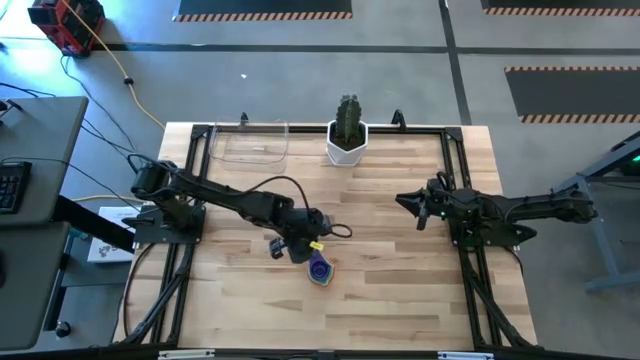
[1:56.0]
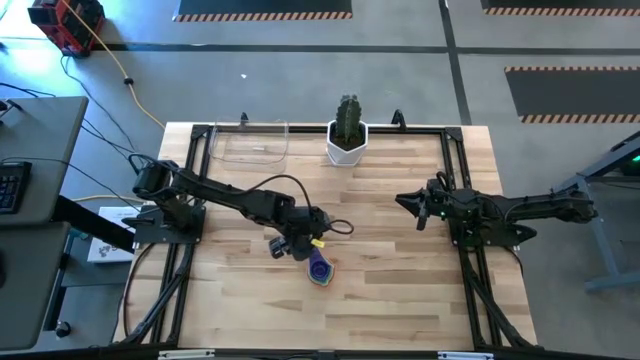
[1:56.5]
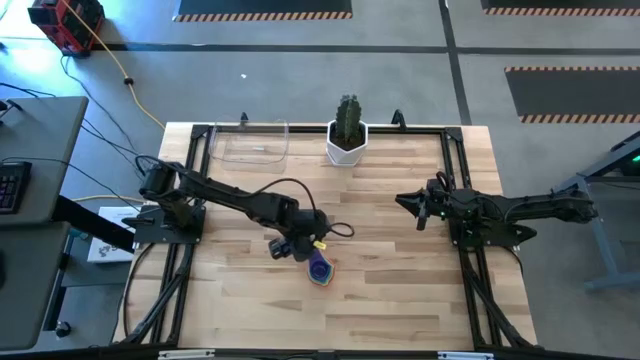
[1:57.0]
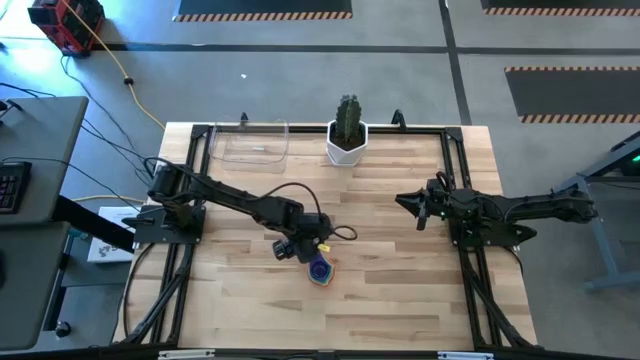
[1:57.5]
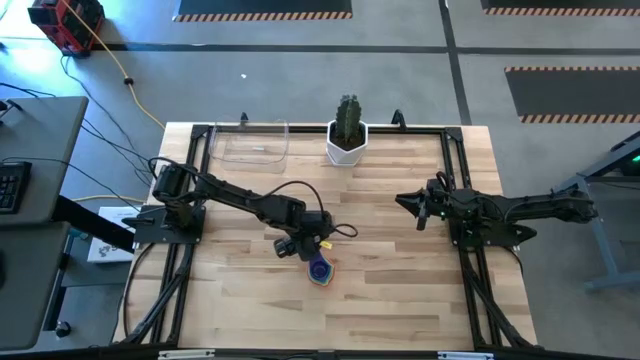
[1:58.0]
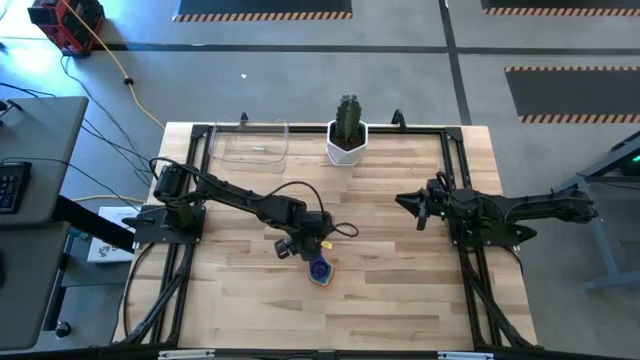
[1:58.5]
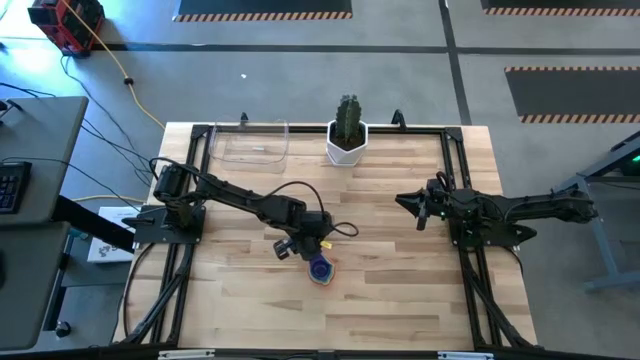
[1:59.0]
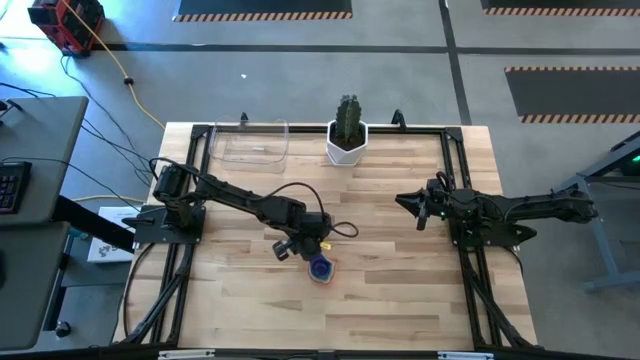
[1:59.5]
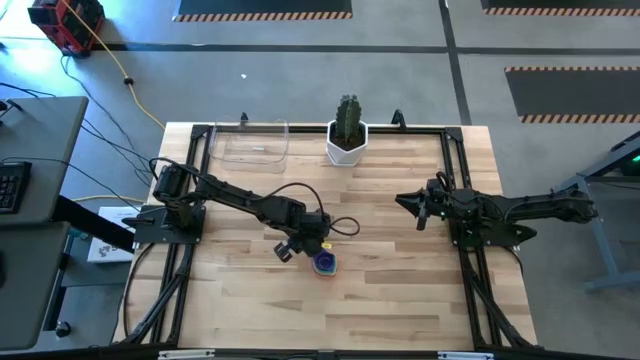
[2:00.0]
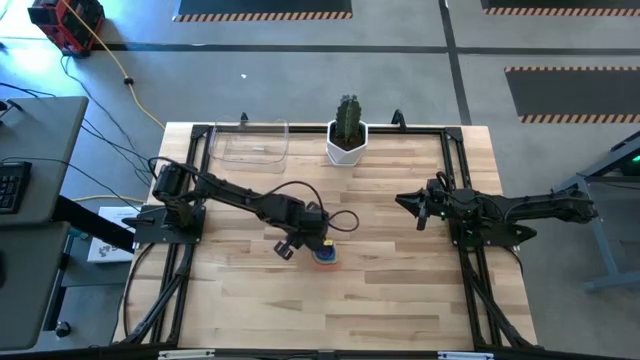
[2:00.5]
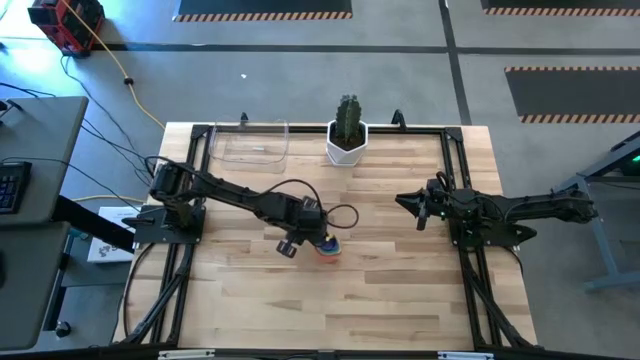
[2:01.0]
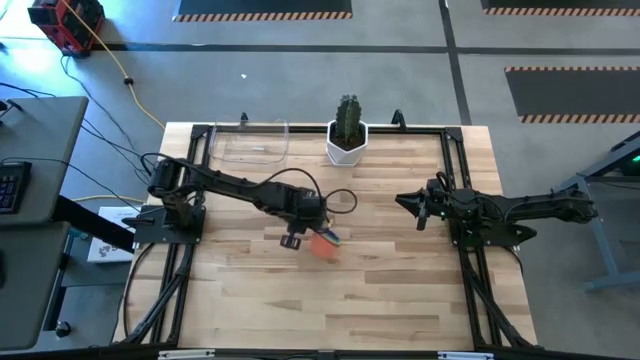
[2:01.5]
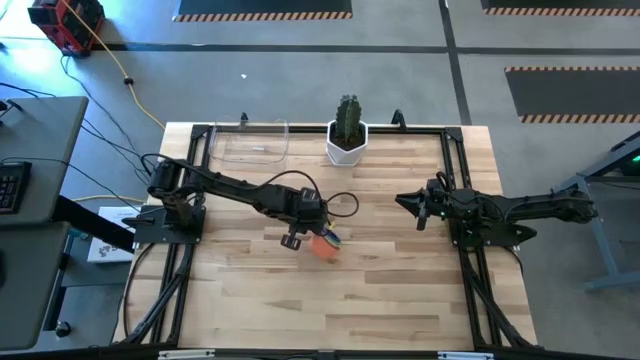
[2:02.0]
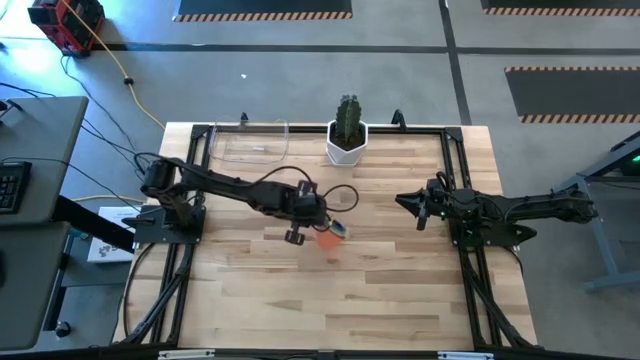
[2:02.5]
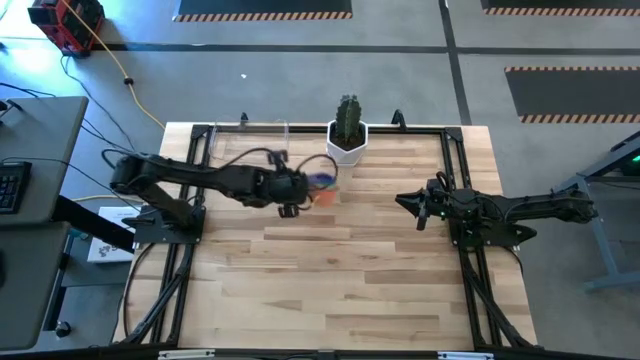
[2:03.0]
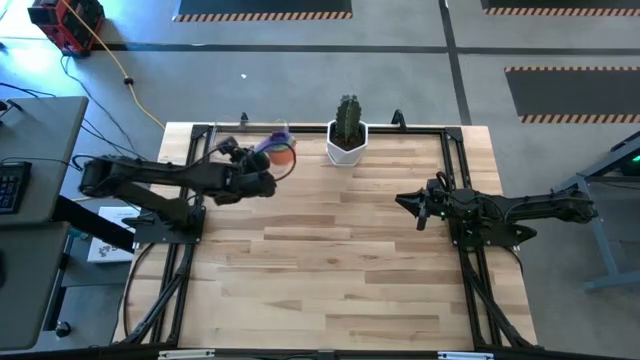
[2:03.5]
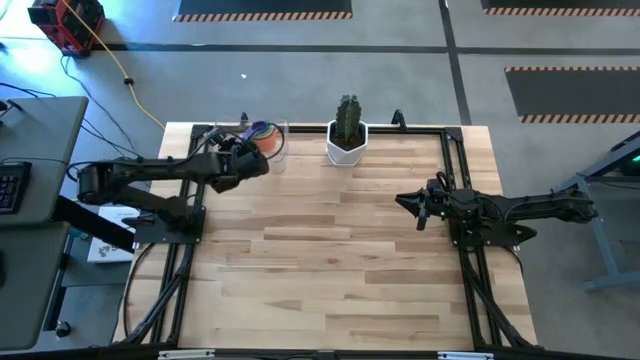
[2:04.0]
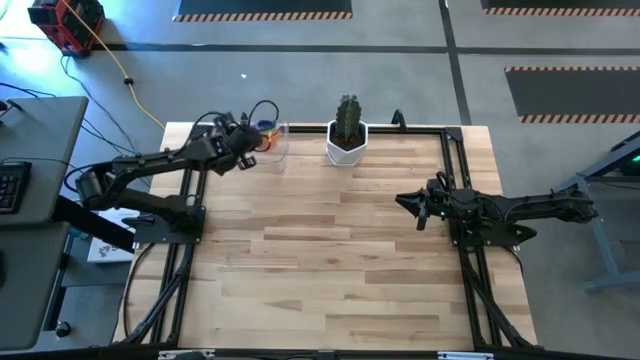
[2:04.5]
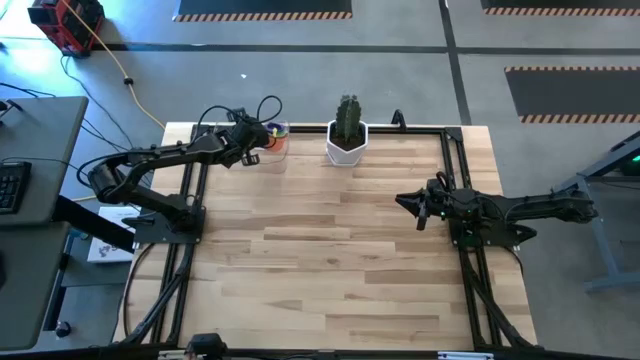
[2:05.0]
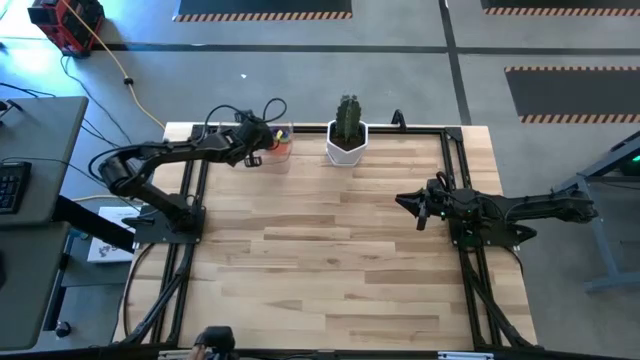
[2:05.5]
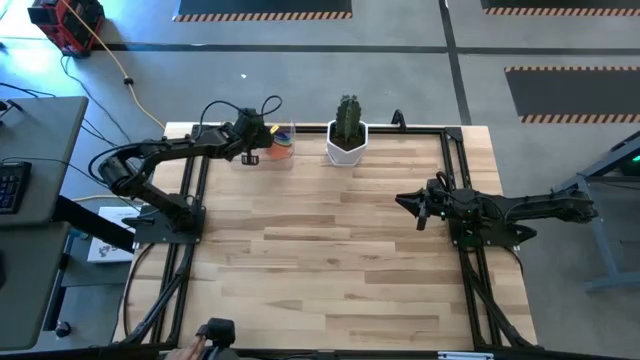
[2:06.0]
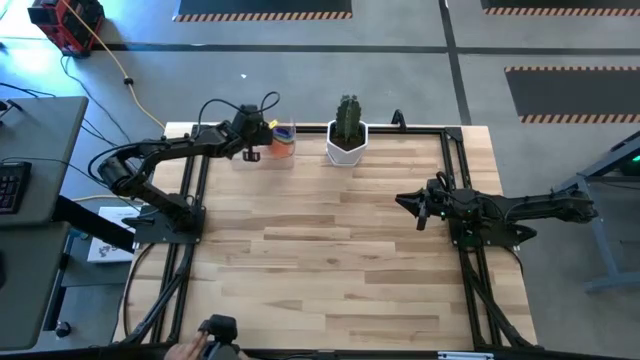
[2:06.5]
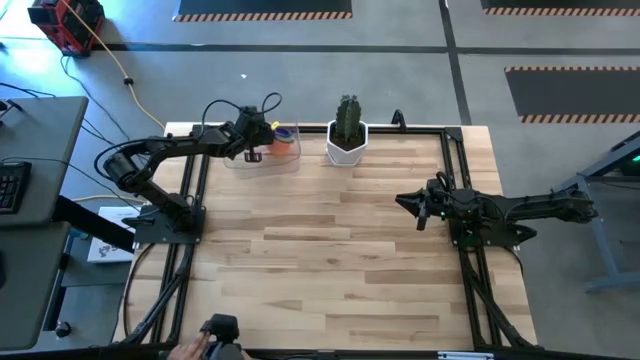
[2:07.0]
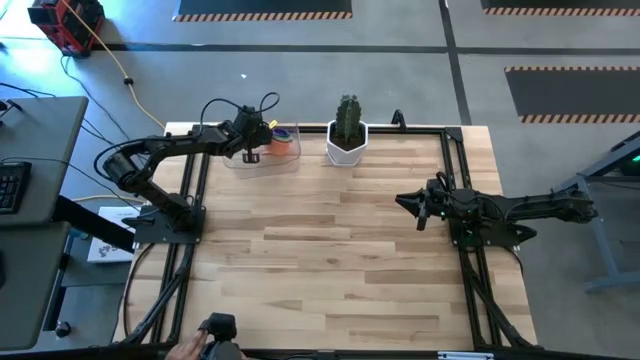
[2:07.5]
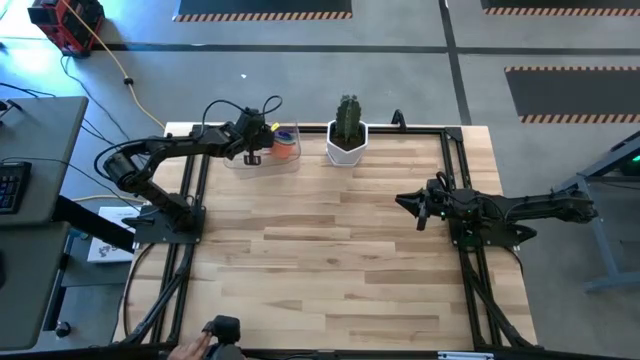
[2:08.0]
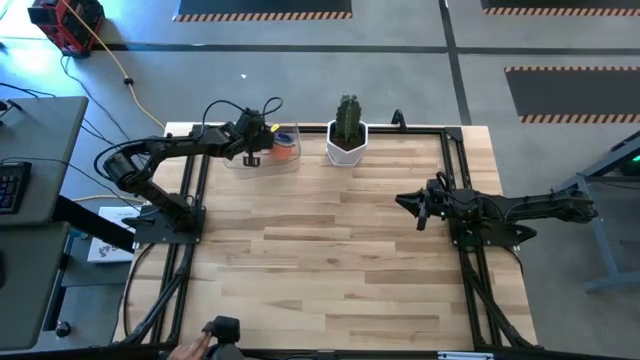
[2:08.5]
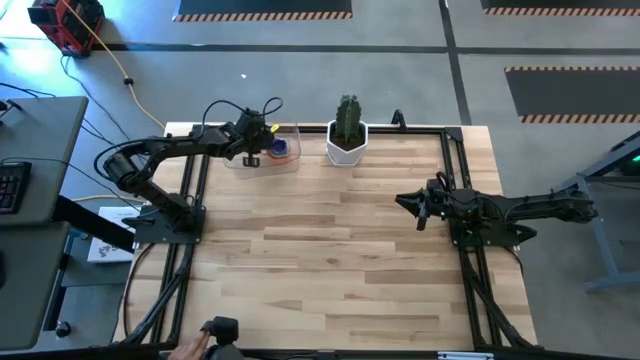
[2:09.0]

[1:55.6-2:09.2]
Task: Nest measuring cups in basket
Put the nested measuring cups into the transparent bin

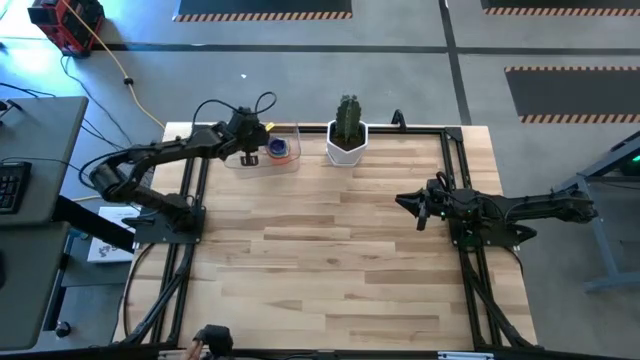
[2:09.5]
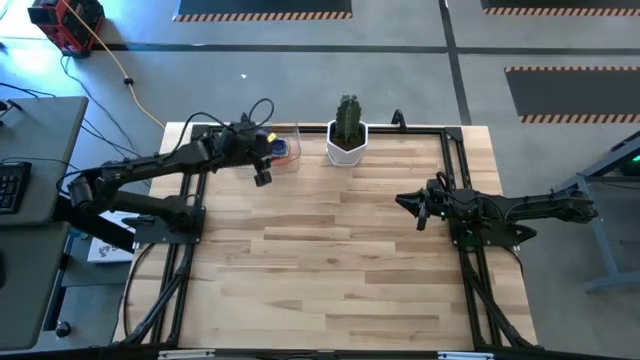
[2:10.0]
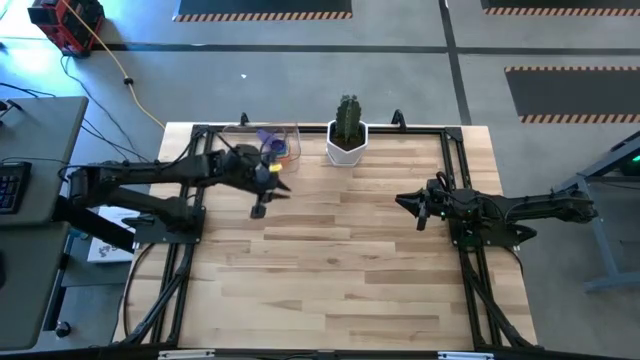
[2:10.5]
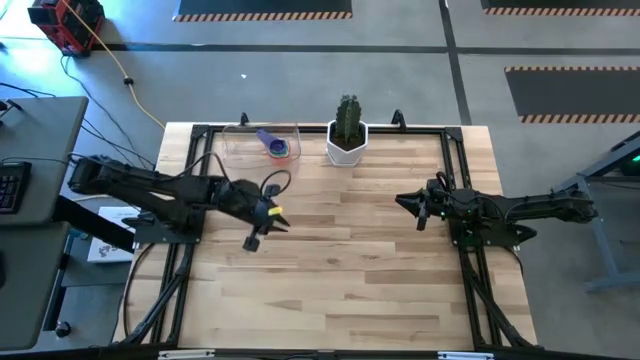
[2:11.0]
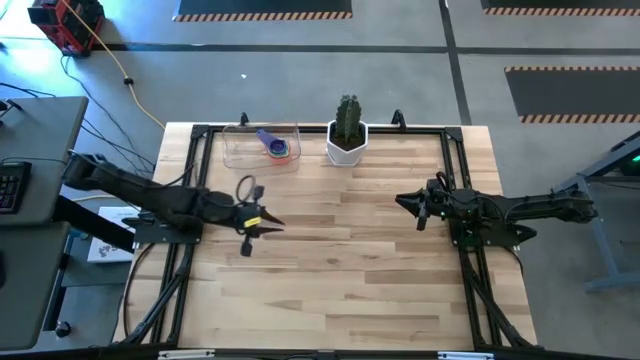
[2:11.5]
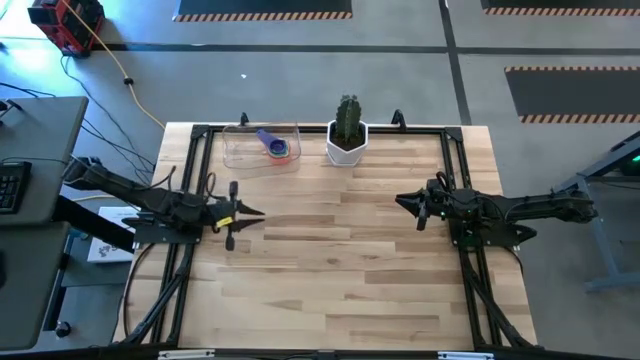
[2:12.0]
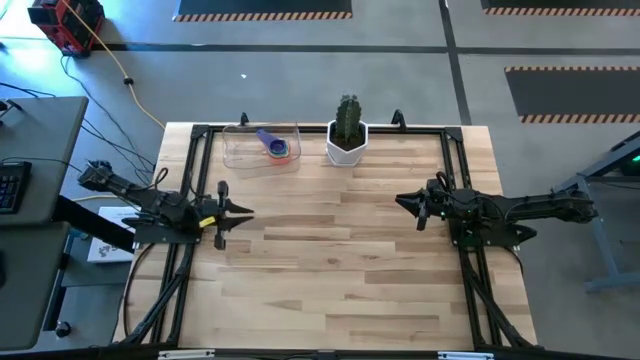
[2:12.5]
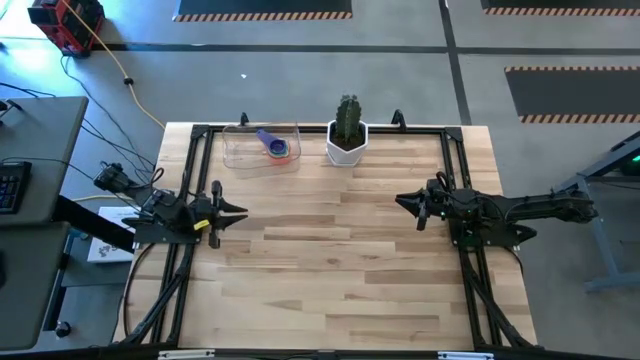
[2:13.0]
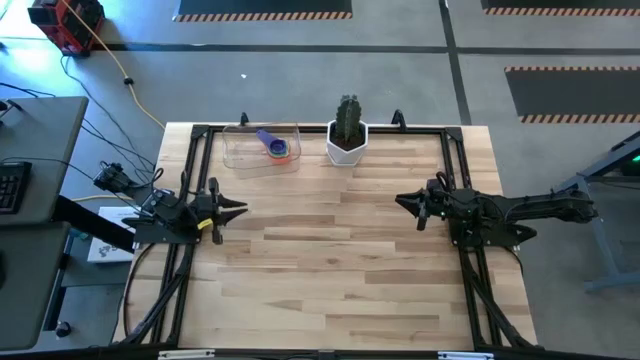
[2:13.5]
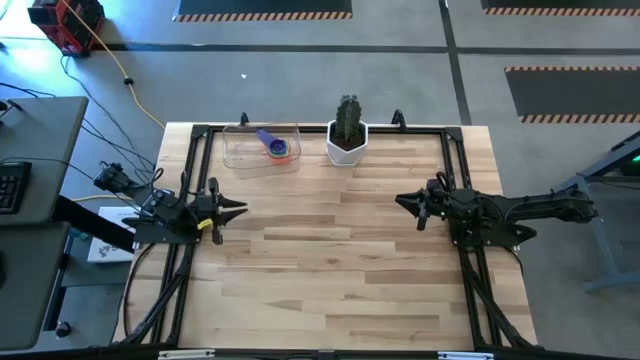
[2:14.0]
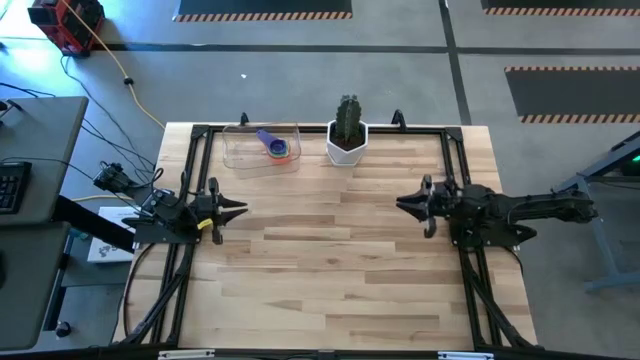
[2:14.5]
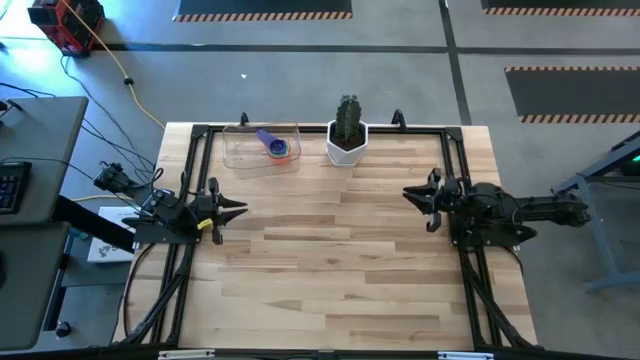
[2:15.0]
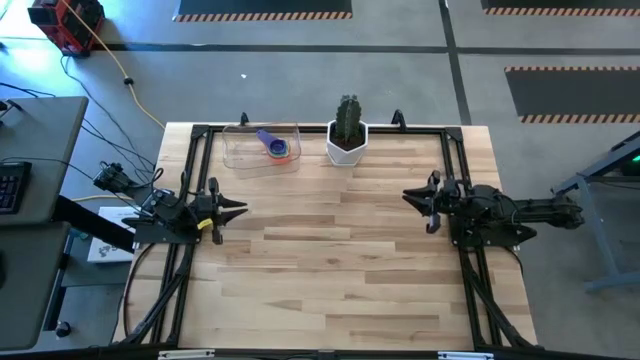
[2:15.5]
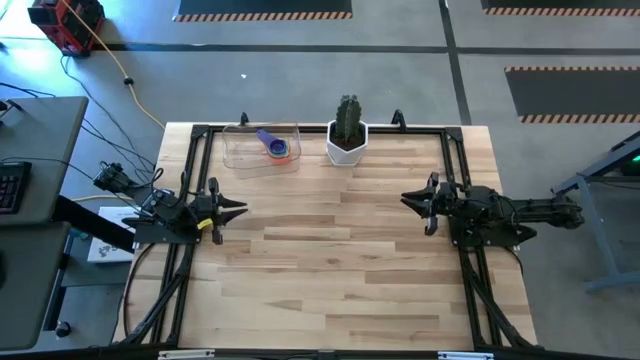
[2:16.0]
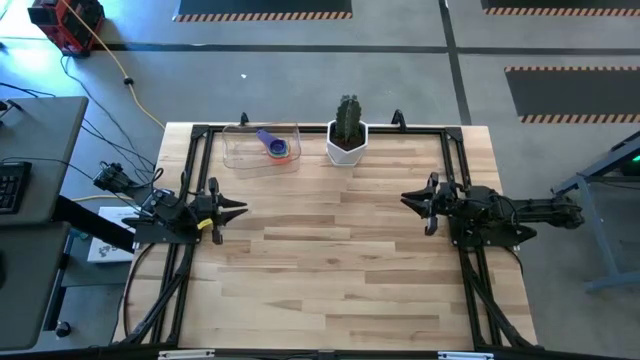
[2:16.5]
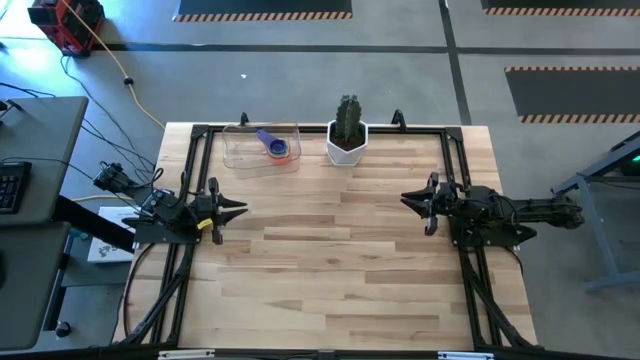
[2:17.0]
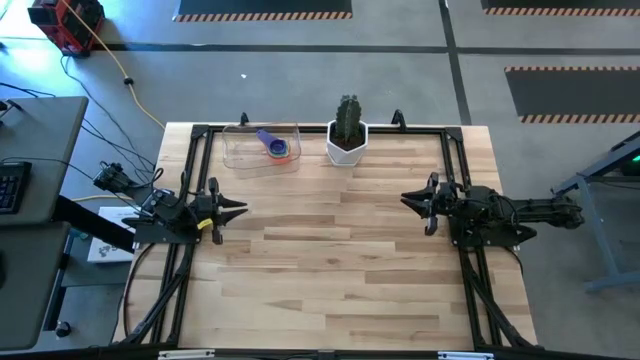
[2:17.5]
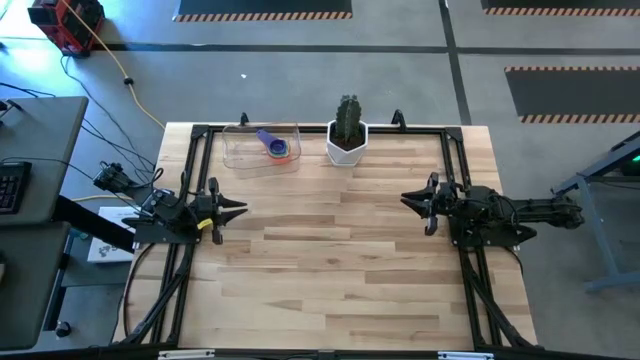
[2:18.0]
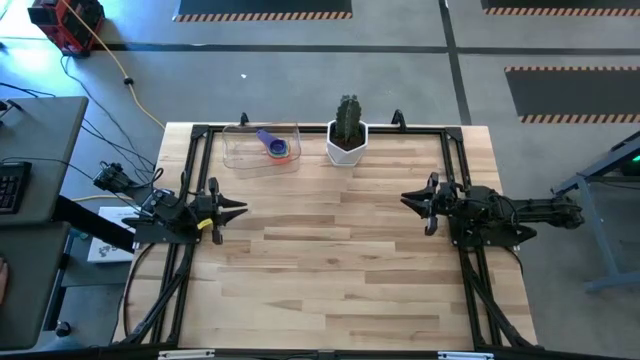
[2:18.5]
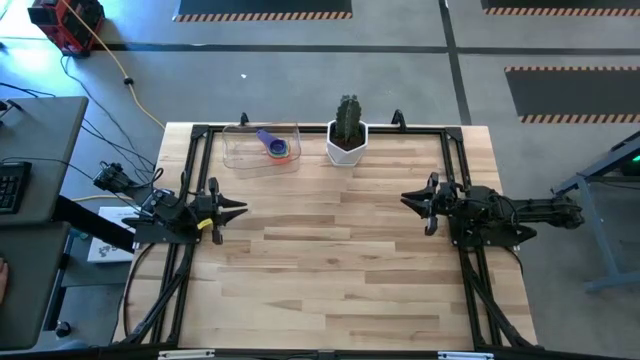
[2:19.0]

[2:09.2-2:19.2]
Return to Home Position
